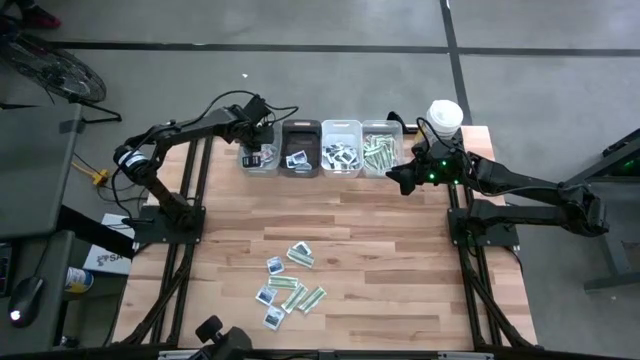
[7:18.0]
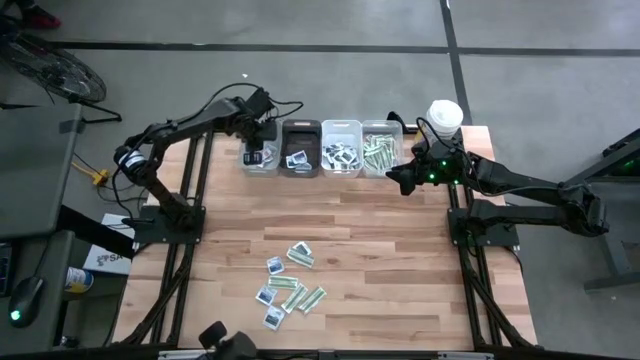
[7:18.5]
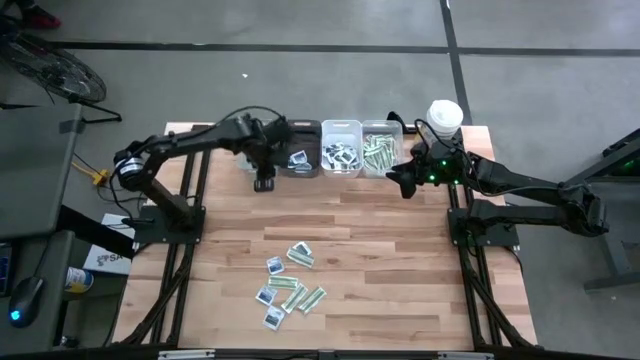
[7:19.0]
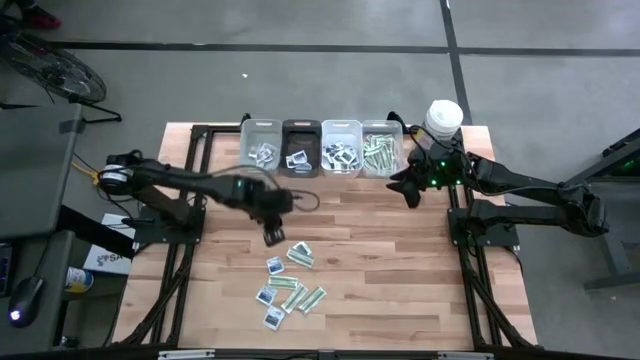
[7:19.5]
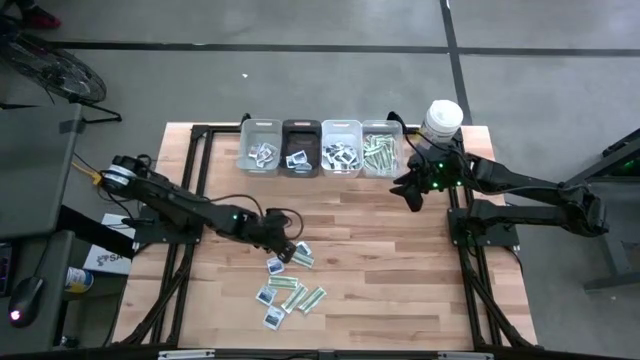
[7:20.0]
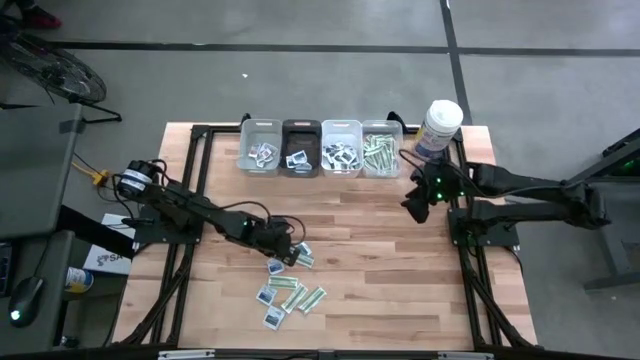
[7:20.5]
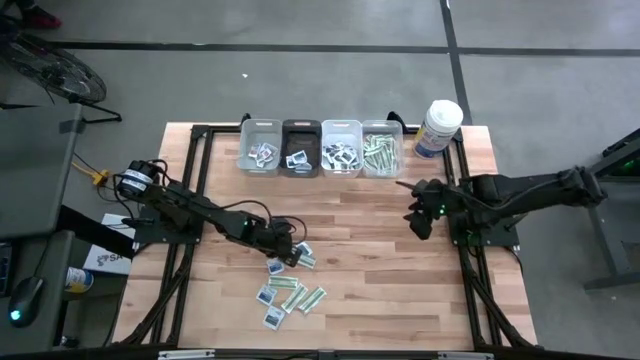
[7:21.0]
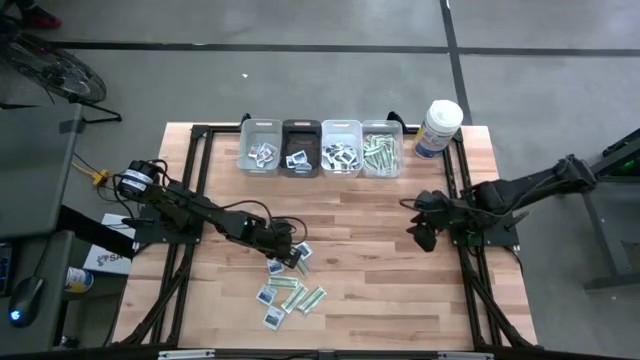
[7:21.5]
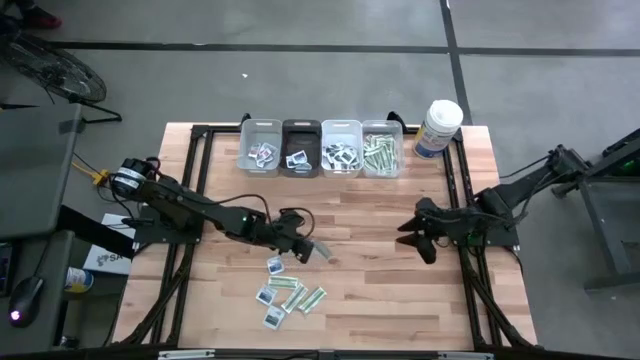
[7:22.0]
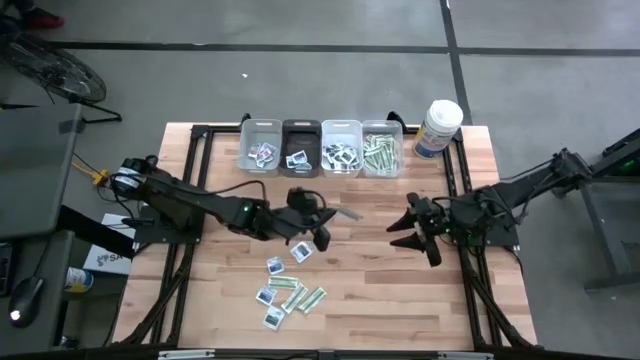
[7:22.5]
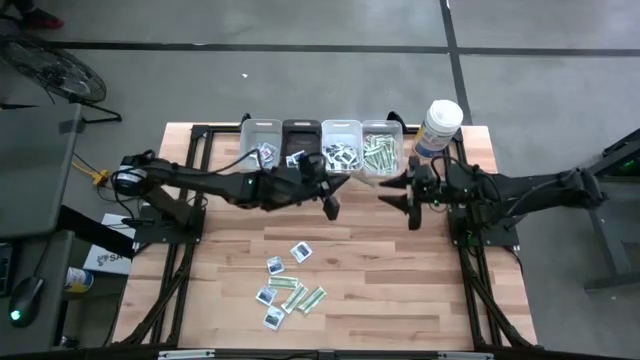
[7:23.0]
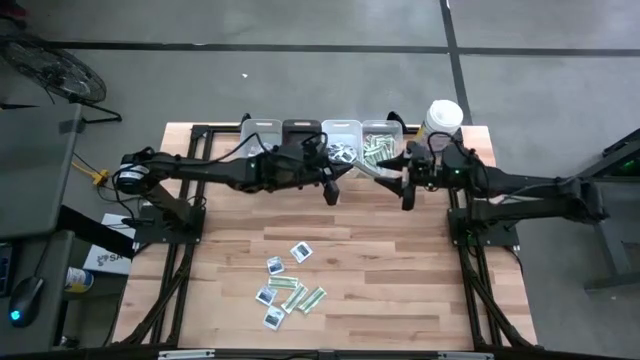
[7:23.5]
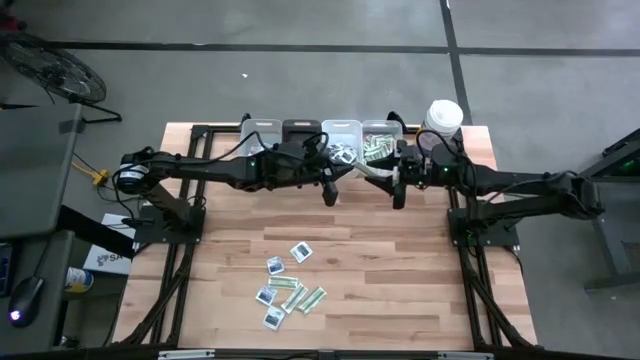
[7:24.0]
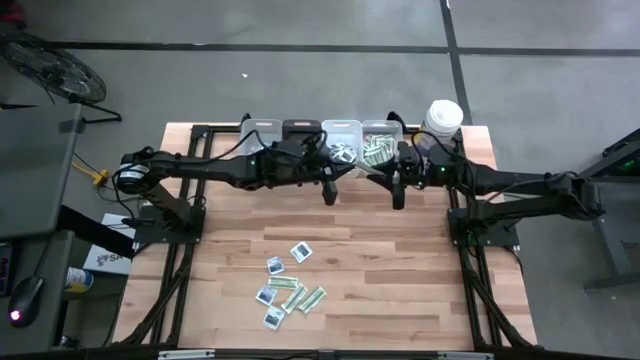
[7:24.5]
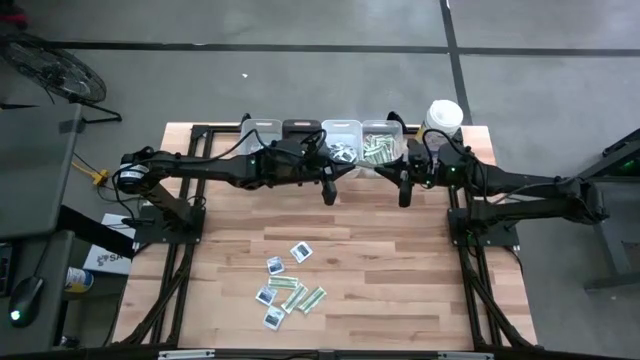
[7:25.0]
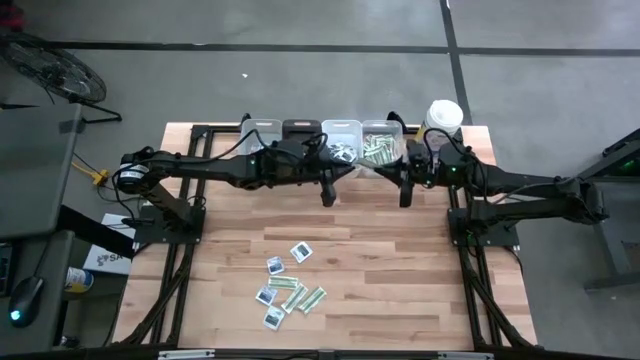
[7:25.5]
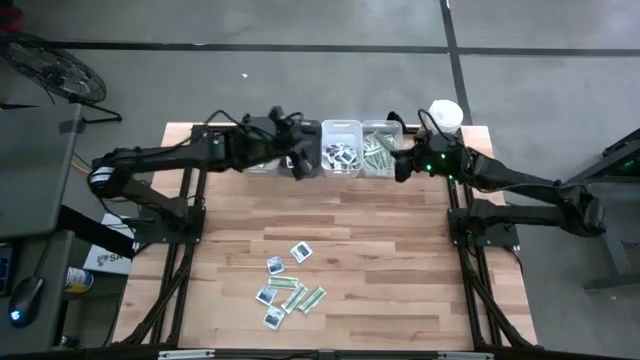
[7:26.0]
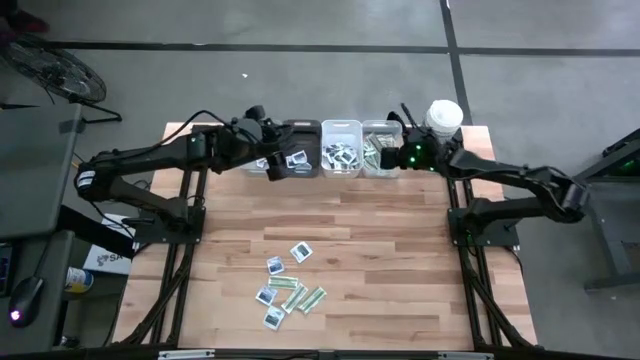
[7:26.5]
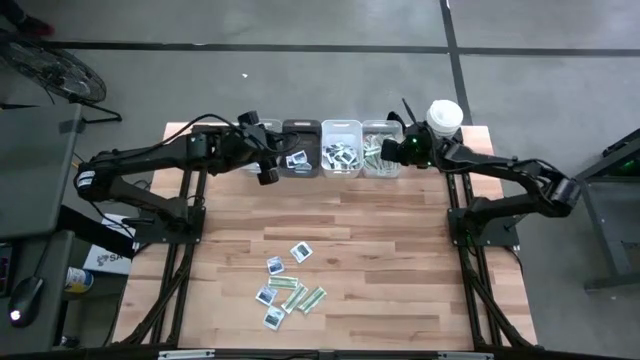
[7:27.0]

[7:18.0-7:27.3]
Task: Pick & Place First Aid Supplies
Put the green bandage into the transparent bin

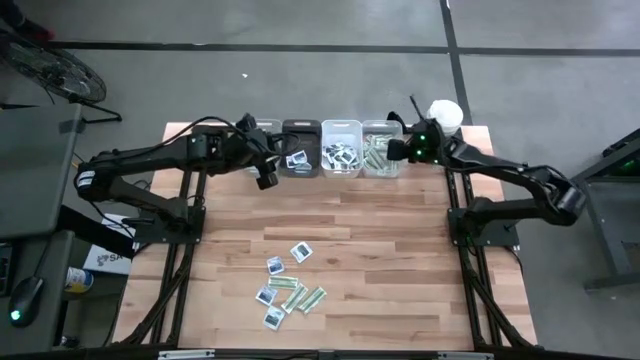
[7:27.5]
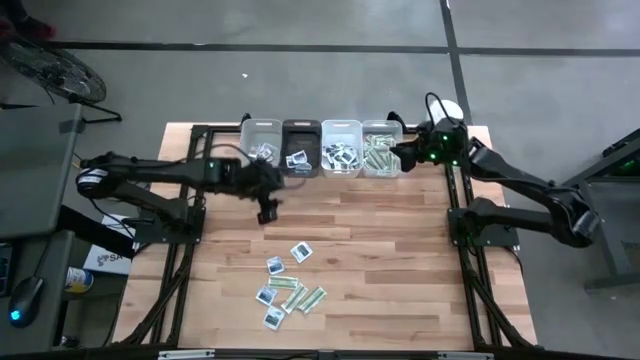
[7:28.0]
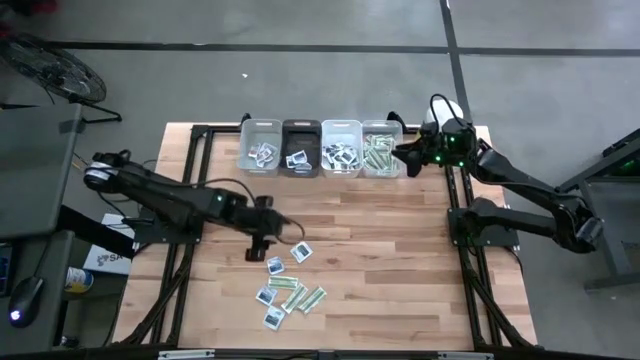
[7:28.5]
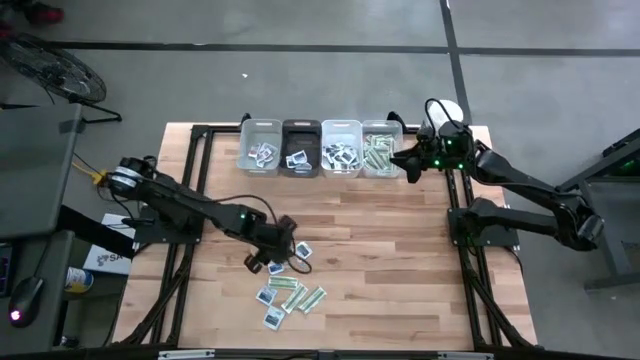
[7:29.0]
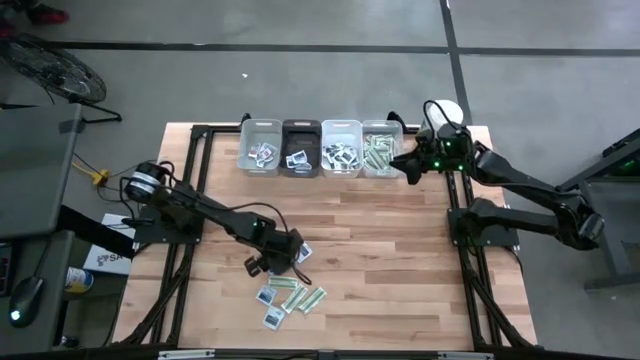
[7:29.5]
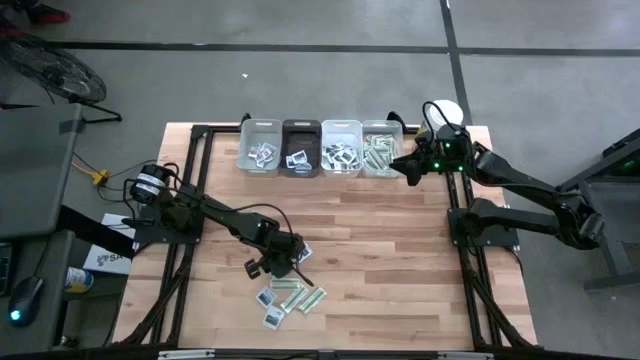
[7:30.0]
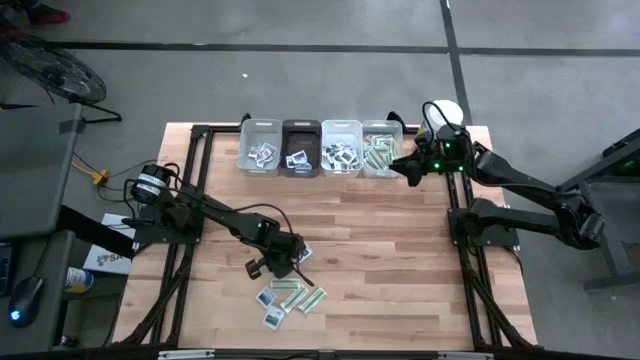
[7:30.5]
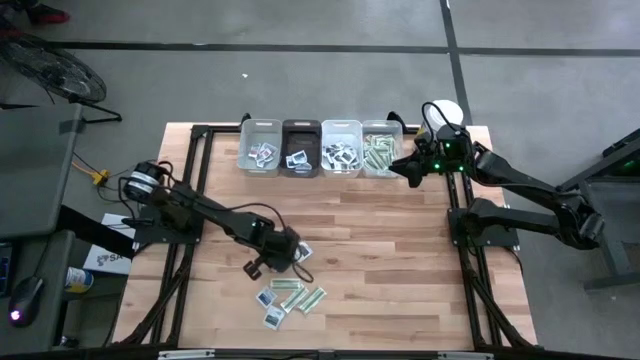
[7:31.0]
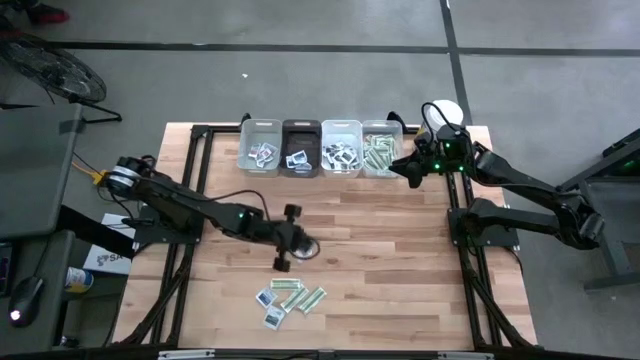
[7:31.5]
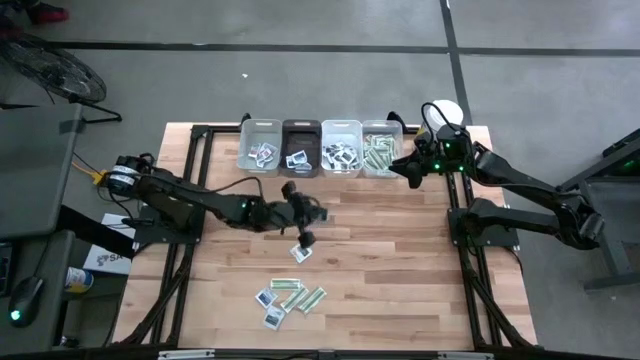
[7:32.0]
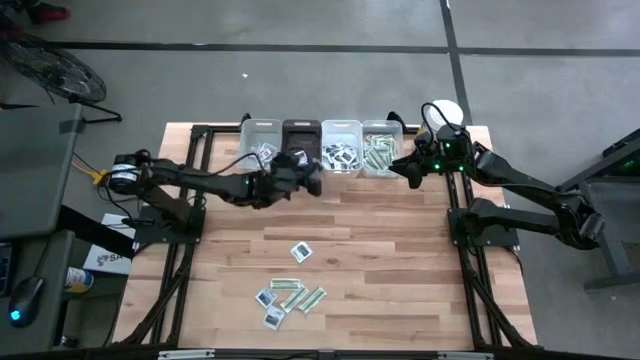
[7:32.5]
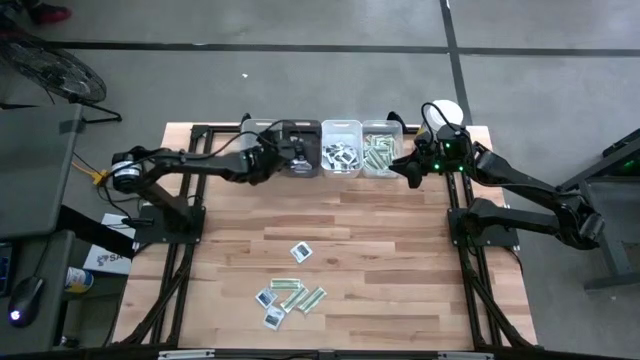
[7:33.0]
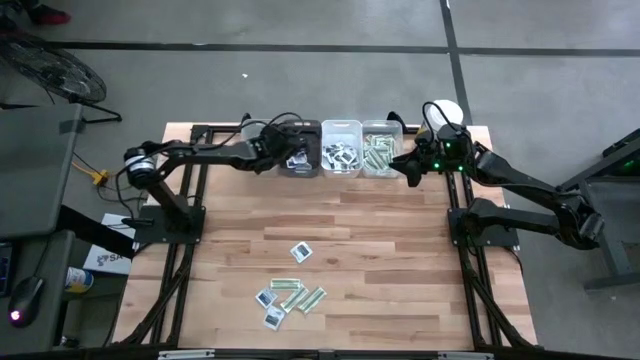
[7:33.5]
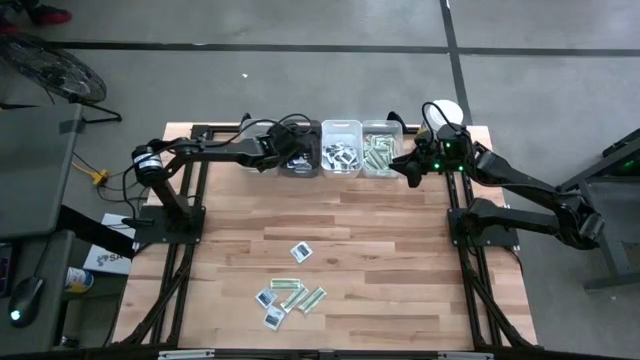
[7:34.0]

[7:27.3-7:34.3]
Put the blue alcohol pad into the black bin

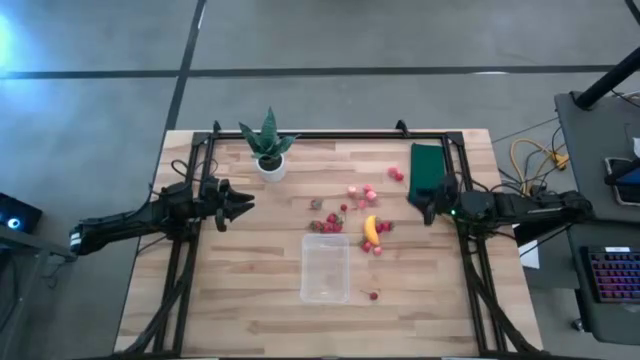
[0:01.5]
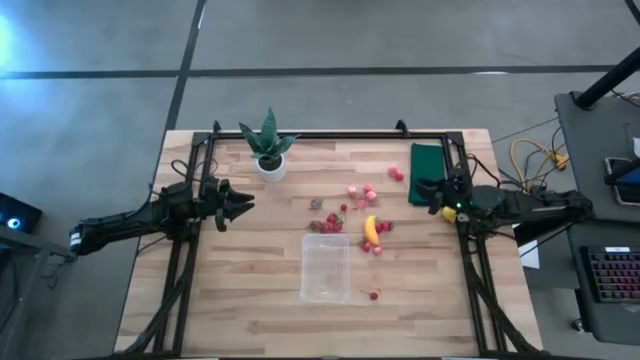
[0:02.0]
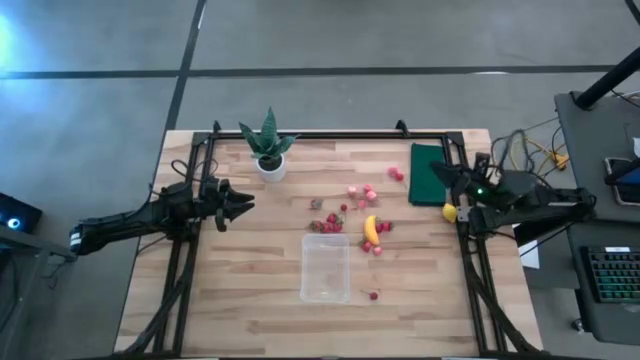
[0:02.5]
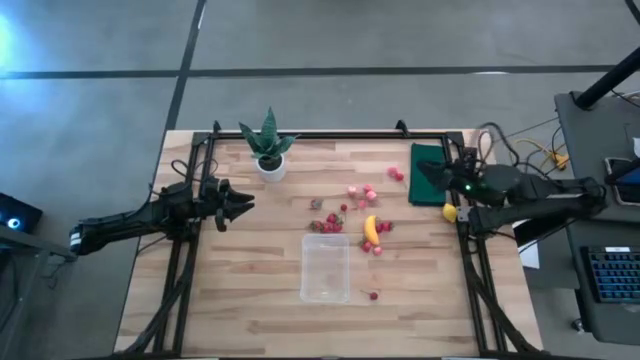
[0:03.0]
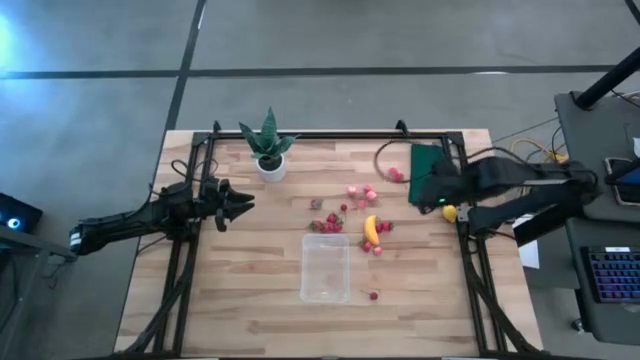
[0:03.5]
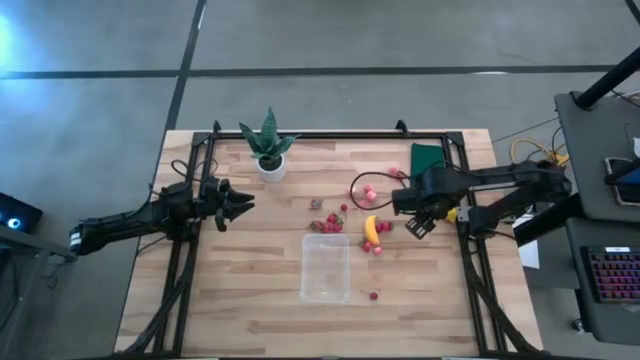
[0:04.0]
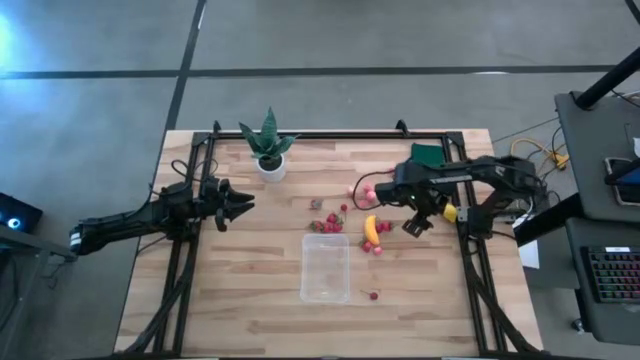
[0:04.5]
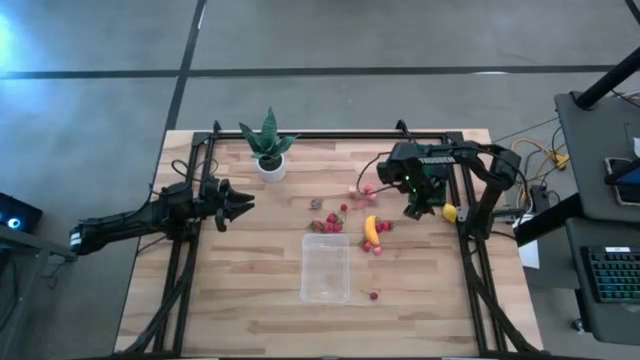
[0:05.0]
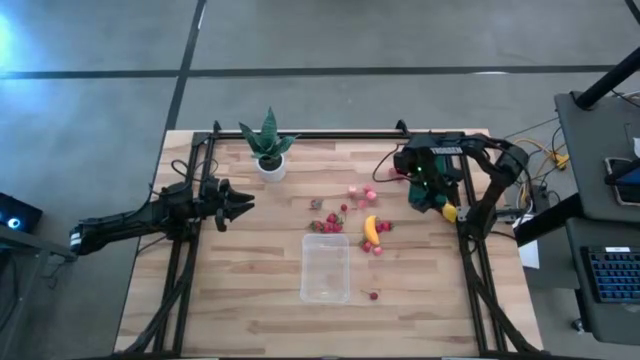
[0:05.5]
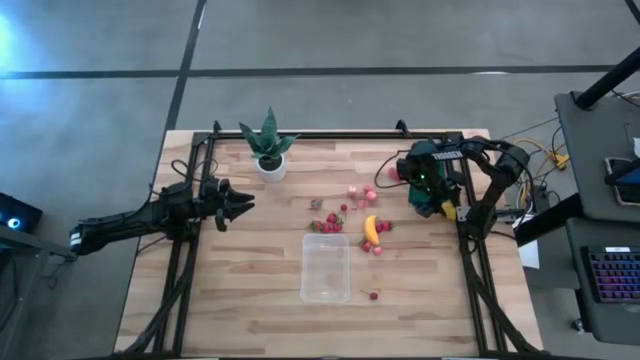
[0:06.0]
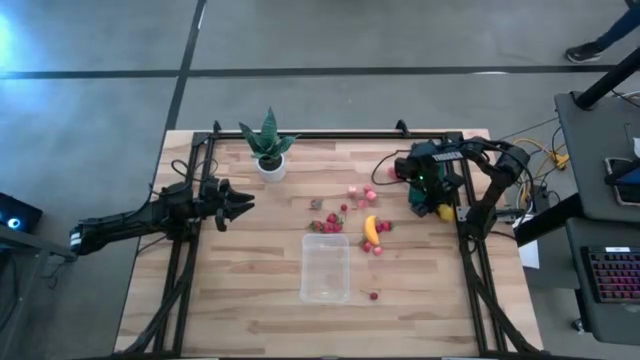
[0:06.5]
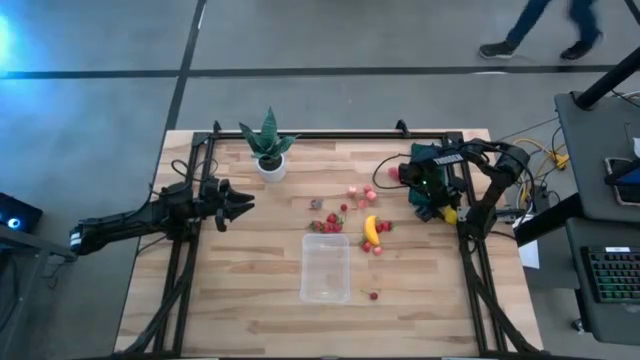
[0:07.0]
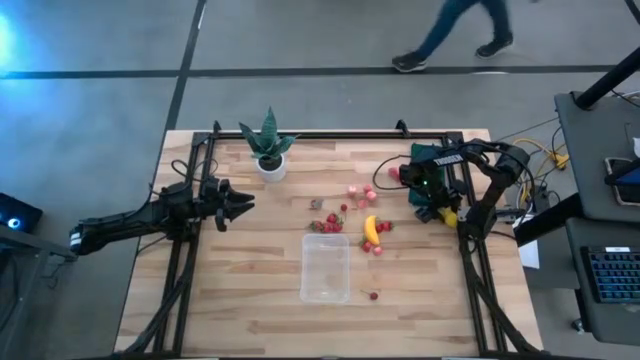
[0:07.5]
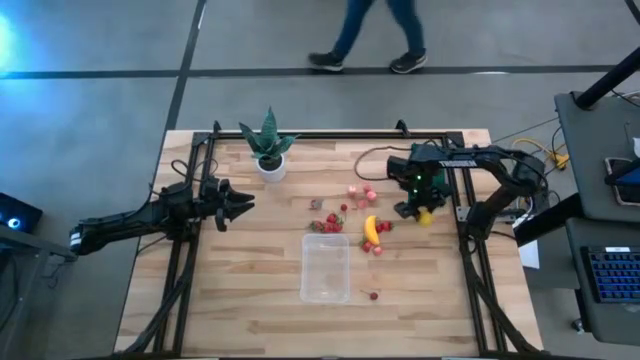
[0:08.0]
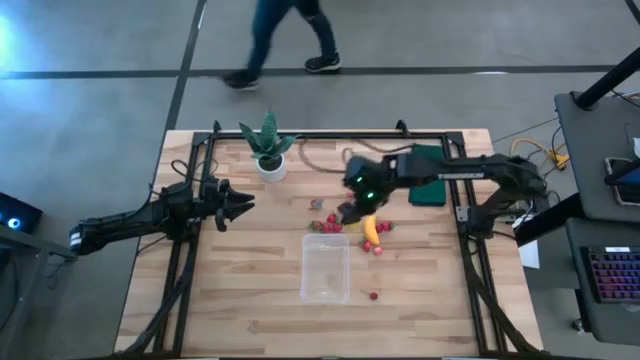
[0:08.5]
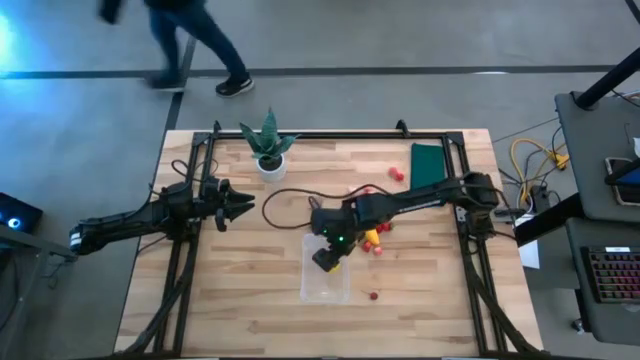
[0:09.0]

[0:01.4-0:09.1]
Task: Pick and placing Produce into tupperware
Put the lemon into the transparent bin
